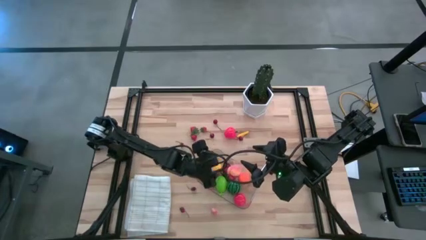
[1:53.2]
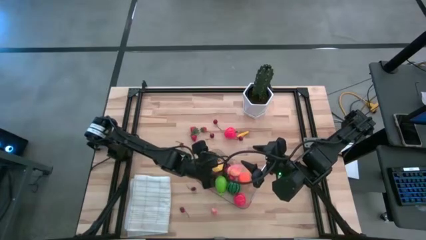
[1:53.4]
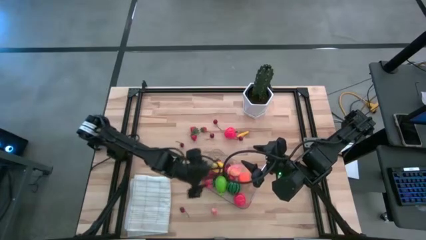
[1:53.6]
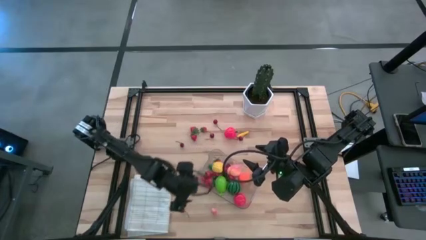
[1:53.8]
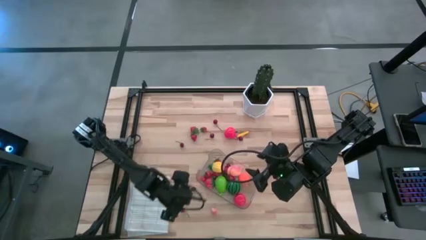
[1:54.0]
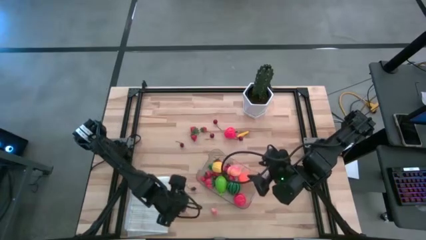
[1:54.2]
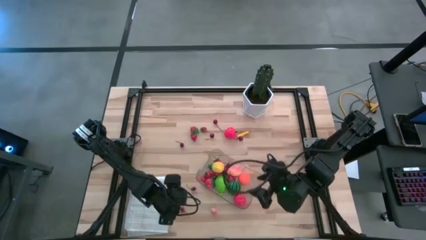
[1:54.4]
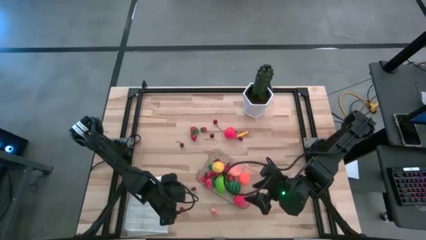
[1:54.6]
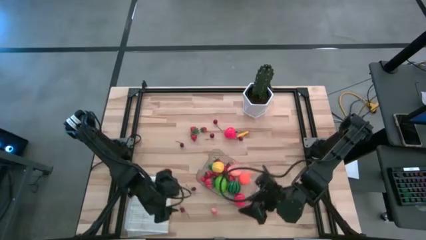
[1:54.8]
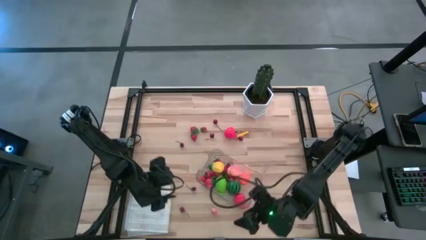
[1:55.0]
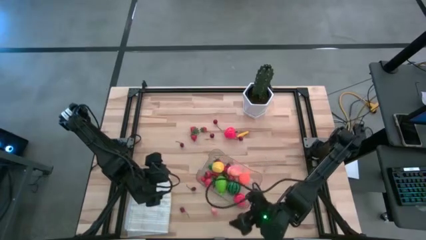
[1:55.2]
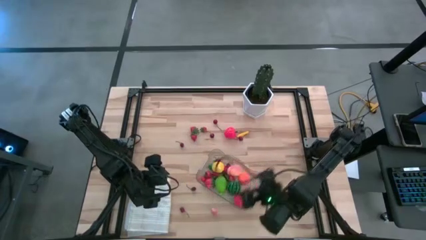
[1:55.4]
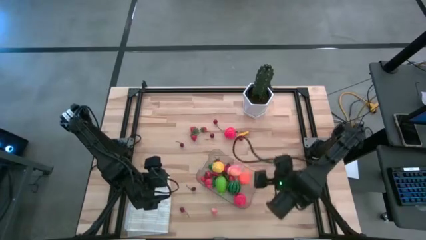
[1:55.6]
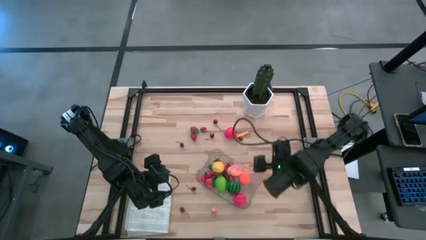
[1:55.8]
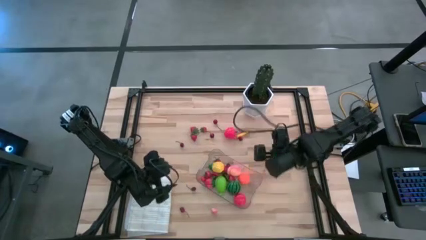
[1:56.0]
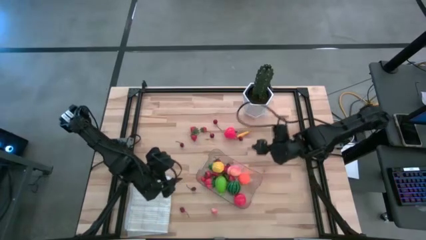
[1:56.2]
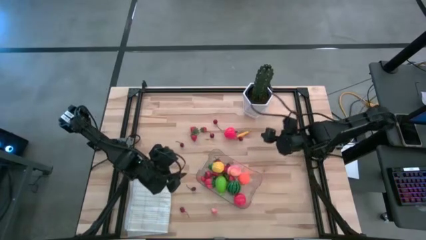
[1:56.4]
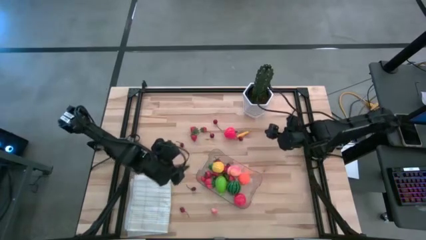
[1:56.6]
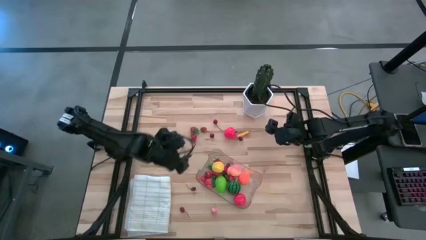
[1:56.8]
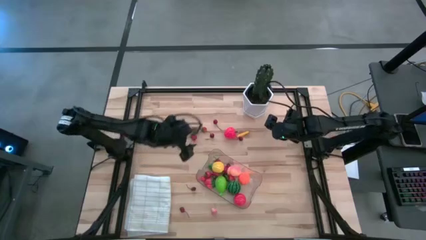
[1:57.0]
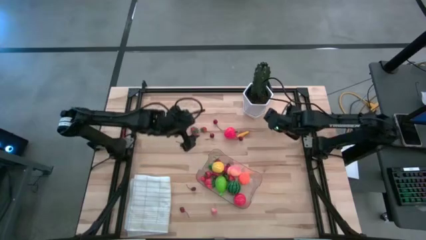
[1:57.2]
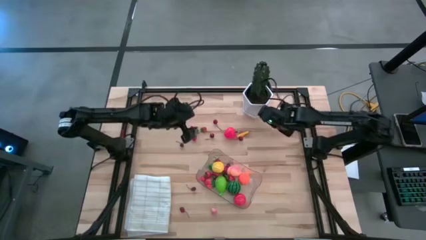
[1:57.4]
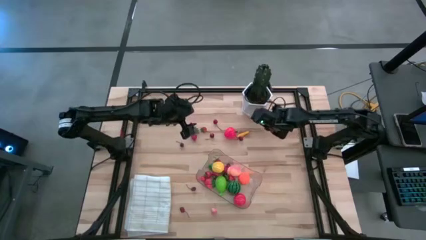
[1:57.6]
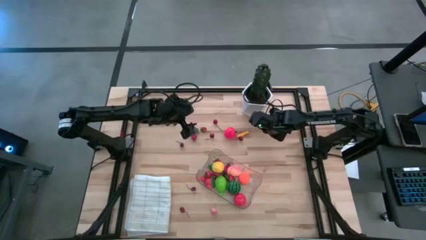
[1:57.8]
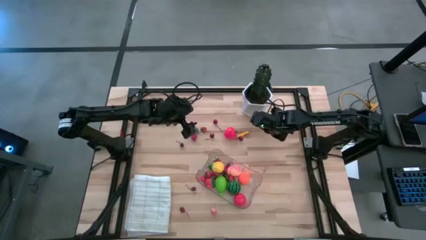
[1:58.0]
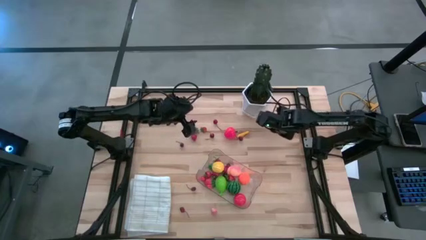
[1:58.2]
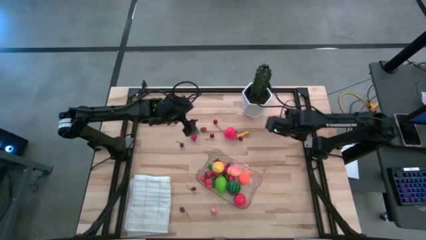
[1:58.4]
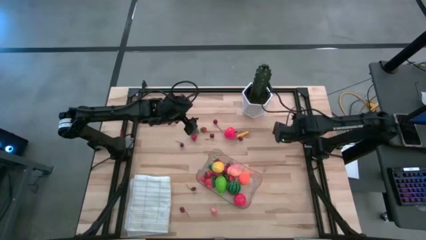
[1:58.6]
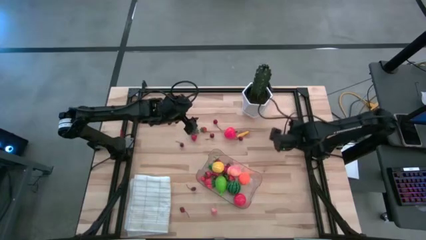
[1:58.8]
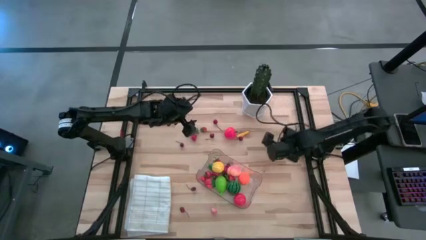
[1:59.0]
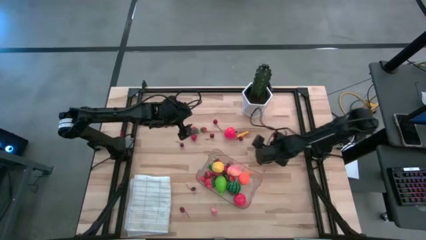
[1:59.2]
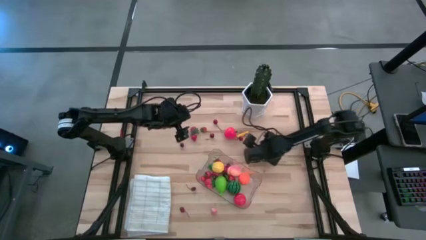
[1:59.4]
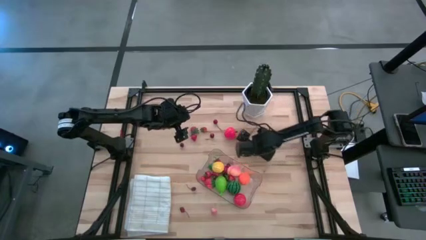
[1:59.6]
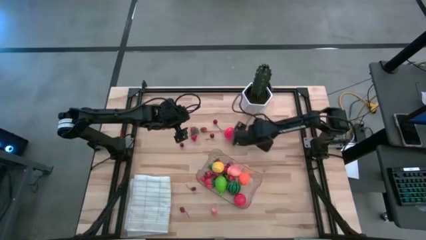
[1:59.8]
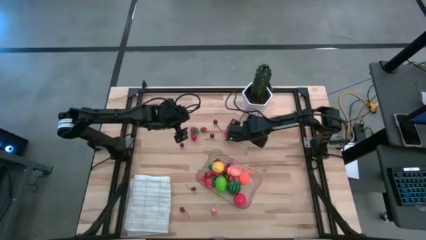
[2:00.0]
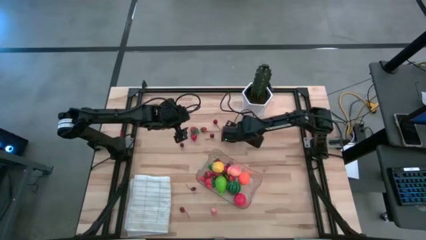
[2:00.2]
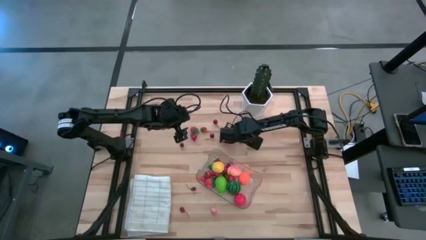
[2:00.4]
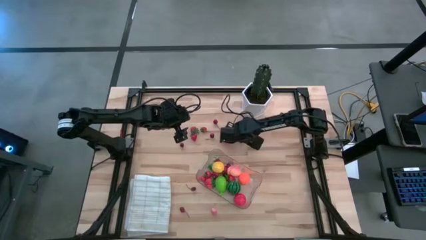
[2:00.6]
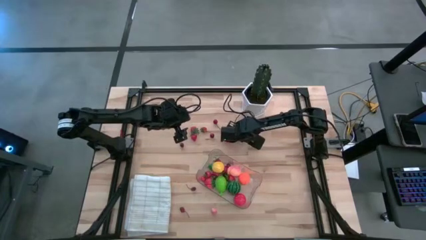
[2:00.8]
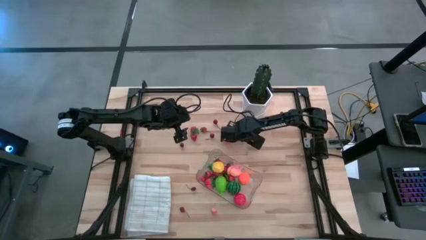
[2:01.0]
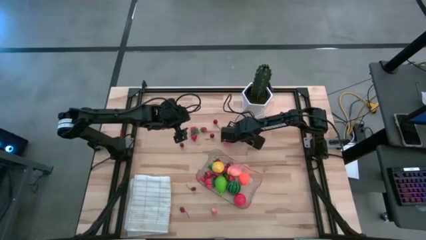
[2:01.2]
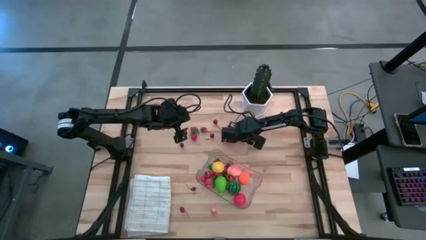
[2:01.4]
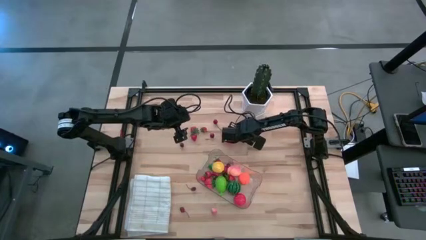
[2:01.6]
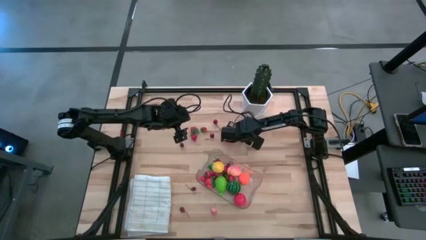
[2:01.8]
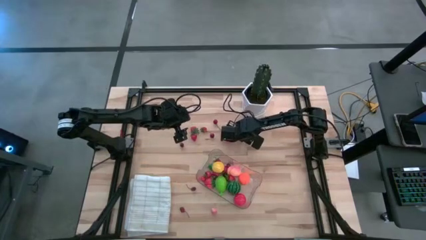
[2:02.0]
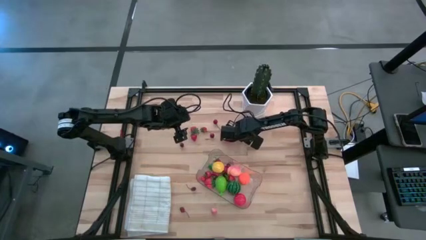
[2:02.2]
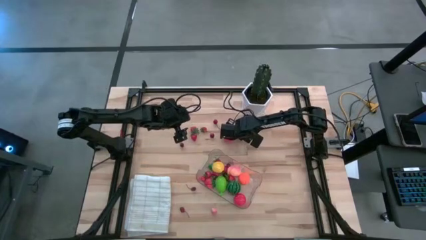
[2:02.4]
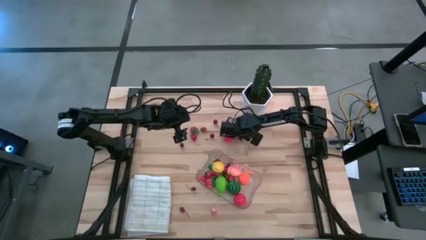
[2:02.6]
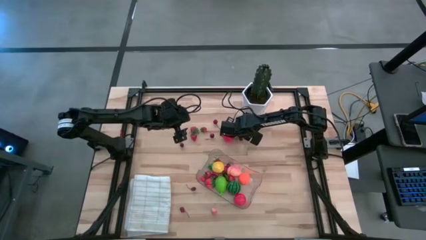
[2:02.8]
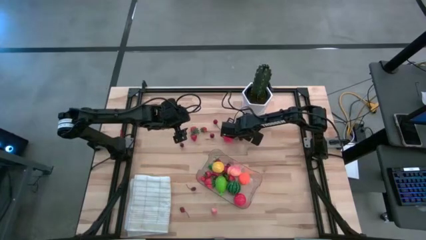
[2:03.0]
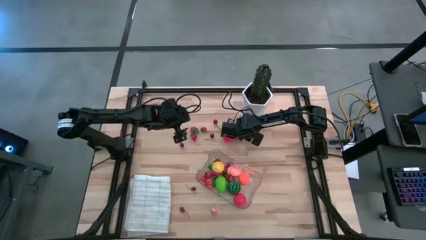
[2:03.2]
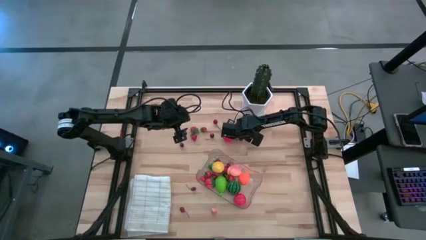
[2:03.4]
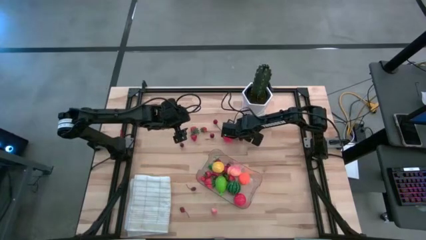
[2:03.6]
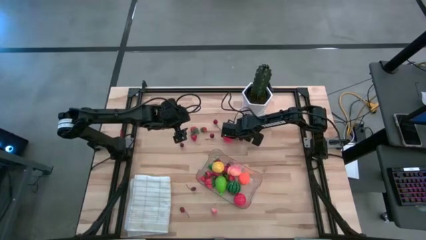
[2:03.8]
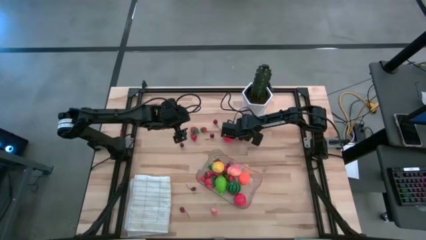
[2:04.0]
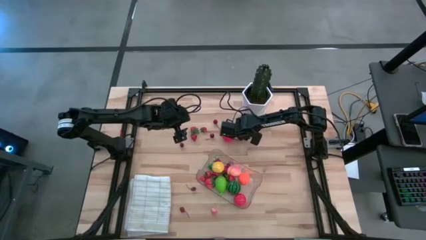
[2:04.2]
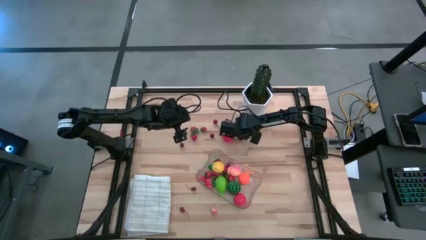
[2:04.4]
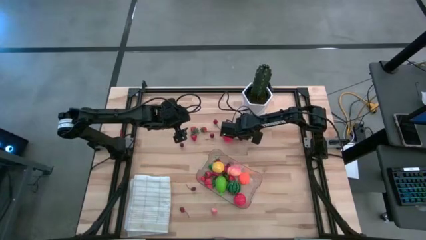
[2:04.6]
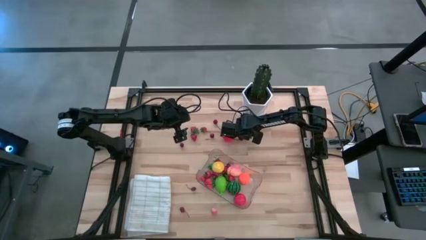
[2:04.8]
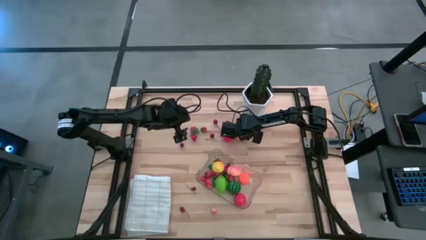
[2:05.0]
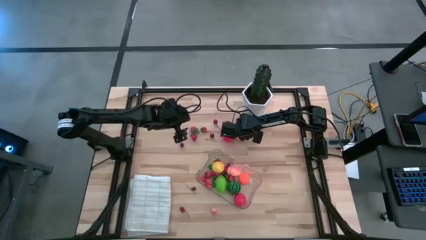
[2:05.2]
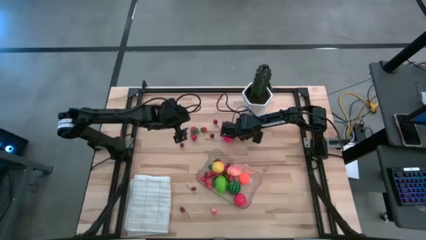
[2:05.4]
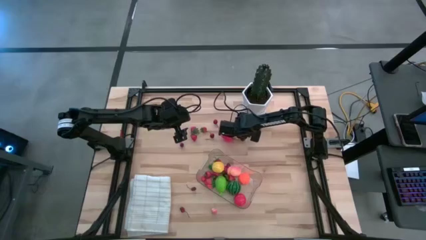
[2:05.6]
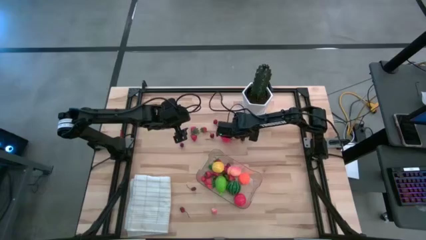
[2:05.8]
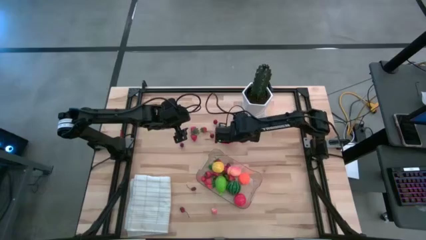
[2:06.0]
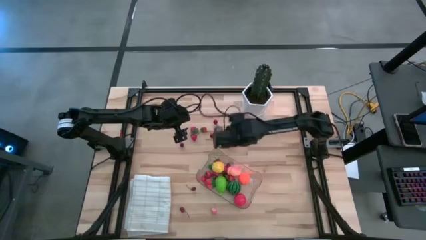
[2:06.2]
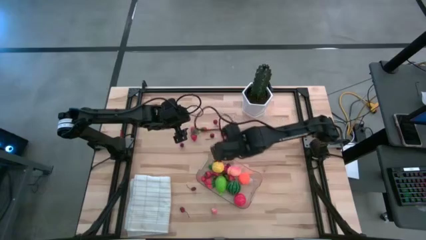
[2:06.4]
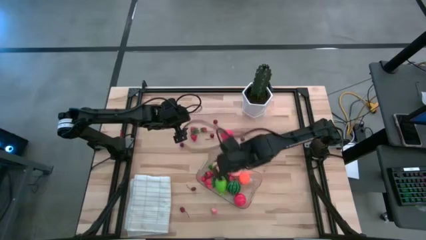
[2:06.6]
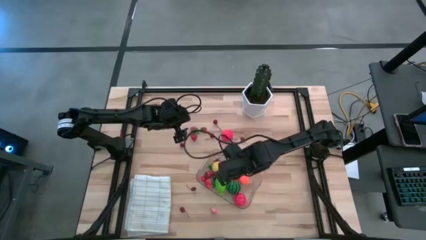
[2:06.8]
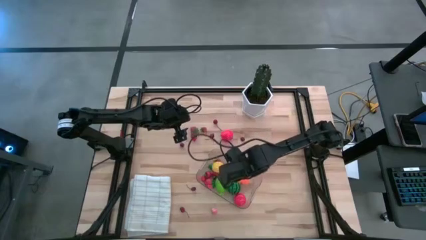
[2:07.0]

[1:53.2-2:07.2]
Task: Pick and placing Produce into tupperware
Put the yellow corn into the transparent bin

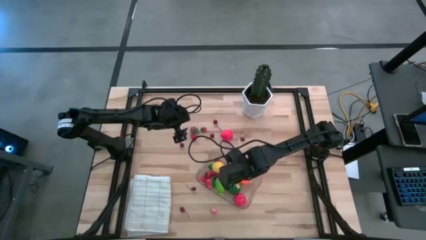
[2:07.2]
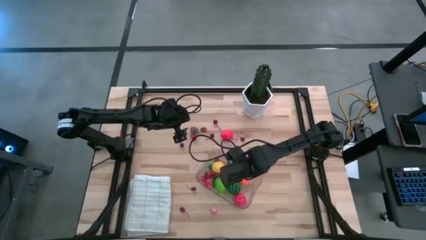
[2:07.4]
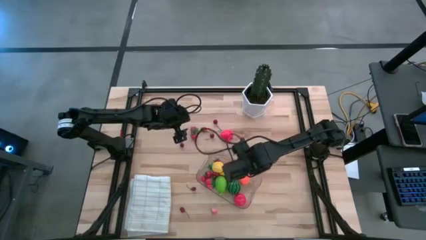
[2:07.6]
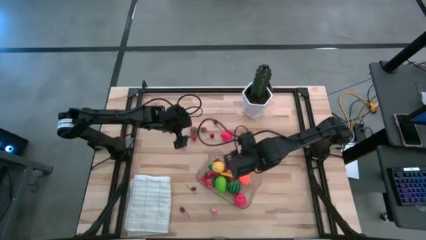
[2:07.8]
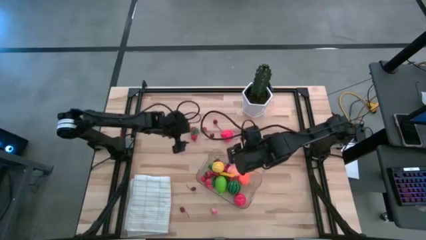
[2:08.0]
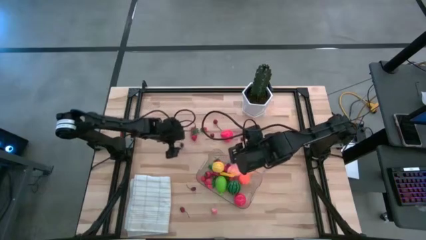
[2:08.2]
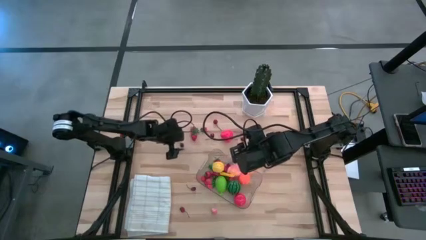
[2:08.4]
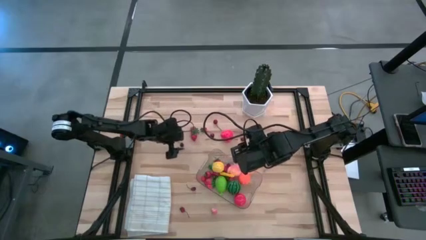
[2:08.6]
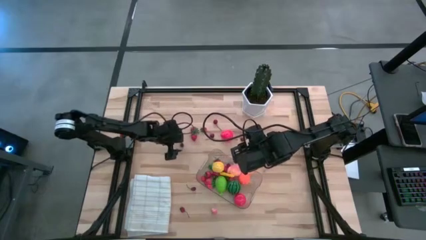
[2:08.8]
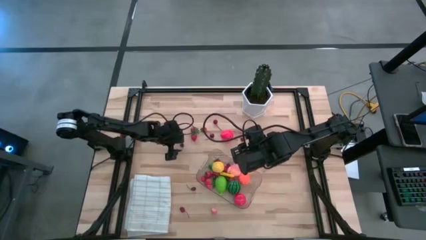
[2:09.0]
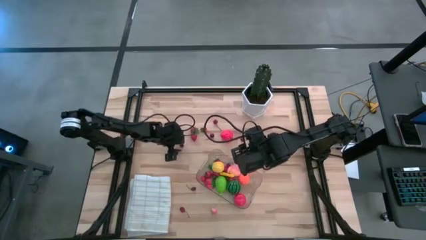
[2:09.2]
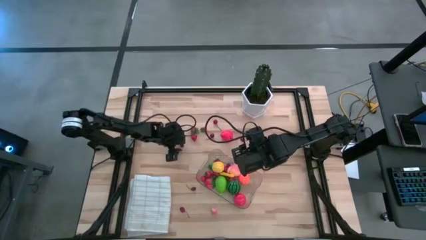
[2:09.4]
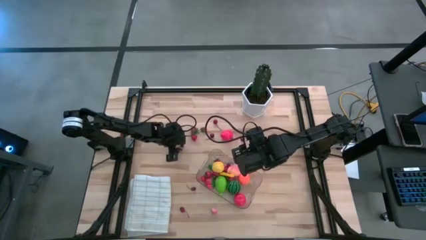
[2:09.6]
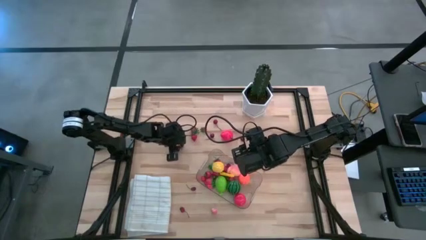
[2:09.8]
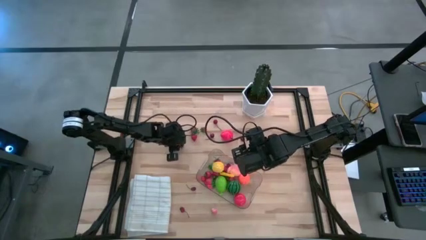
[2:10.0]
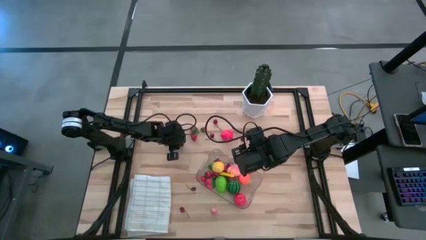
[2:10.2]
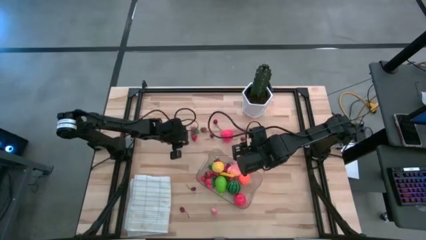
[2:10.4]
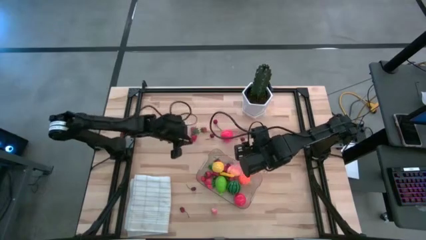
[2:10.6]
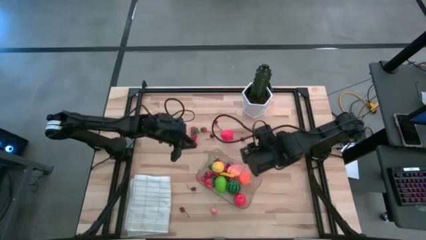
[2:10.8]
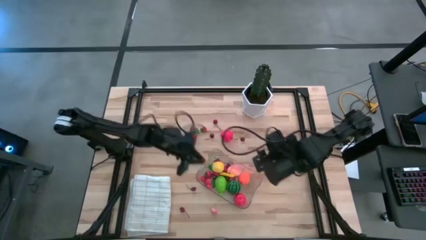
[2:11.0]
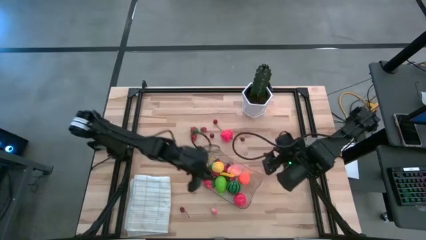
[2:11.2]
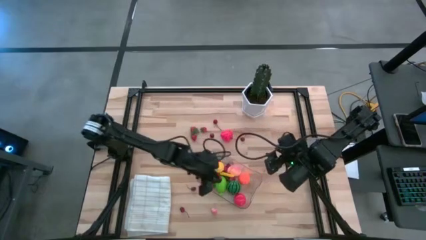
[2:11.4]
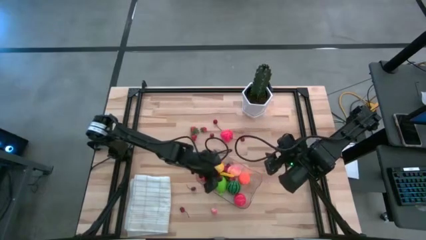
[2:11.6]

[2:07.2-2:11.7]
Put the red cherry into the transparent bin
